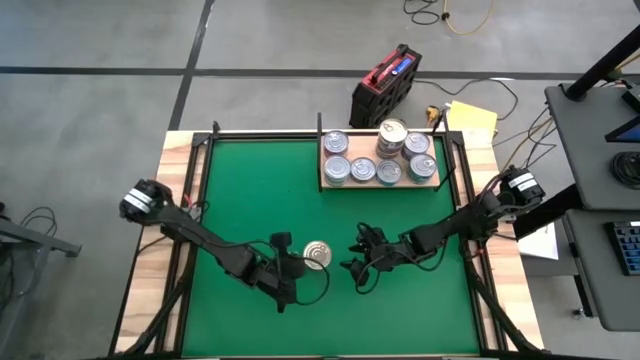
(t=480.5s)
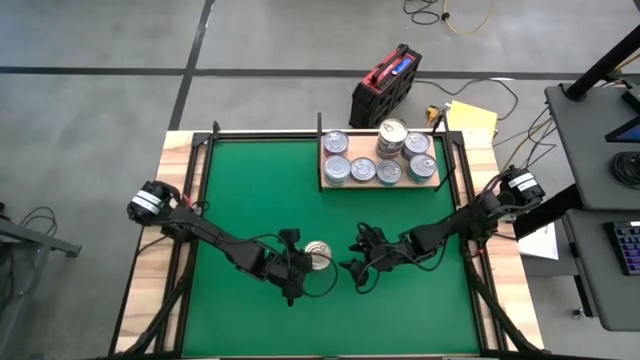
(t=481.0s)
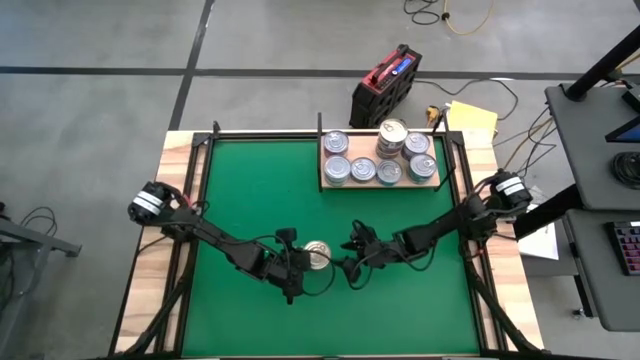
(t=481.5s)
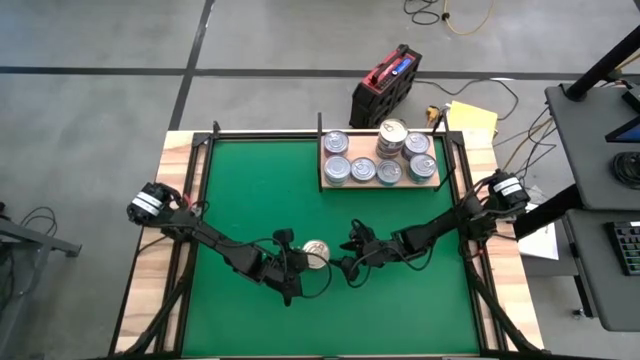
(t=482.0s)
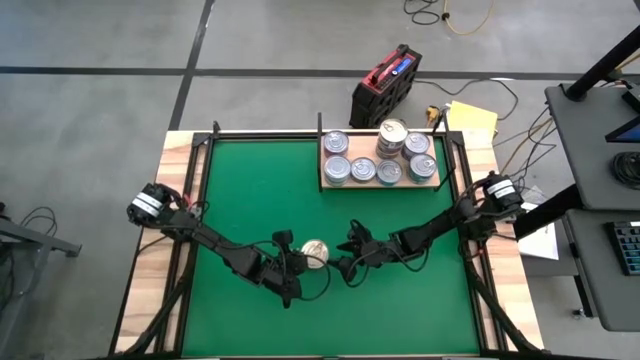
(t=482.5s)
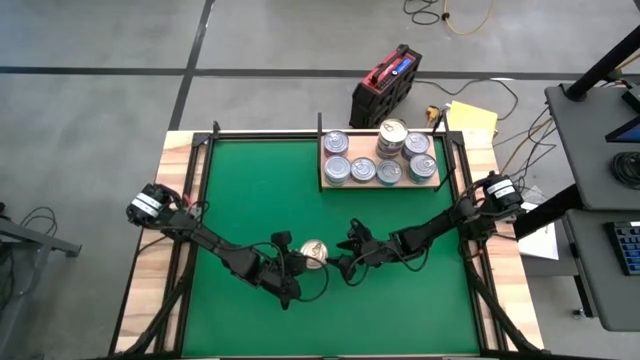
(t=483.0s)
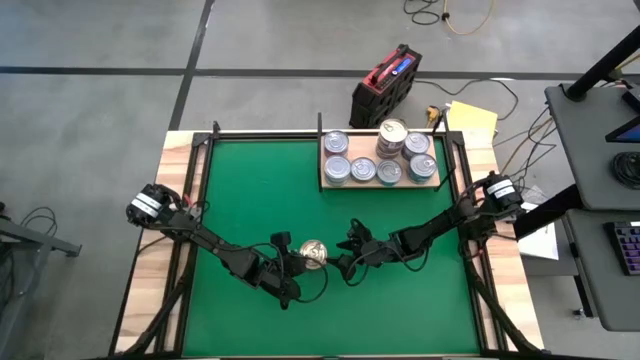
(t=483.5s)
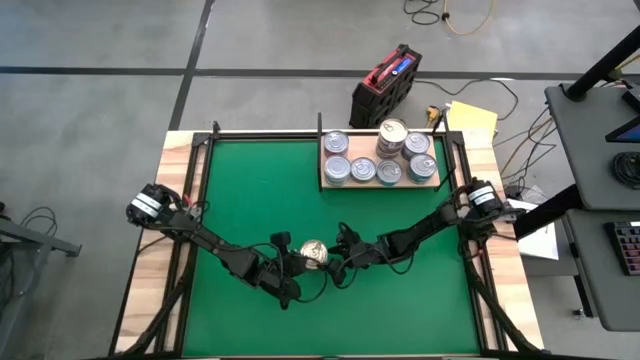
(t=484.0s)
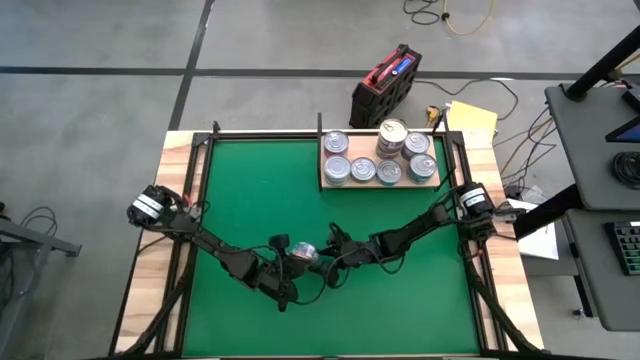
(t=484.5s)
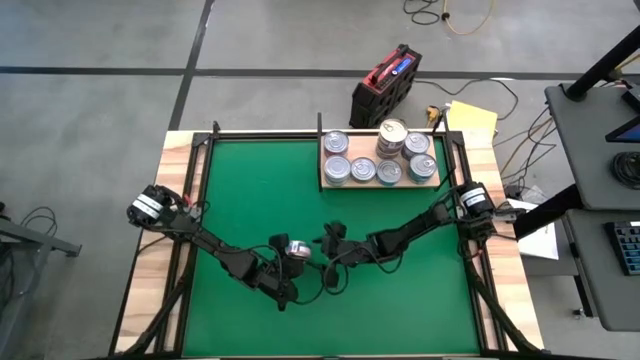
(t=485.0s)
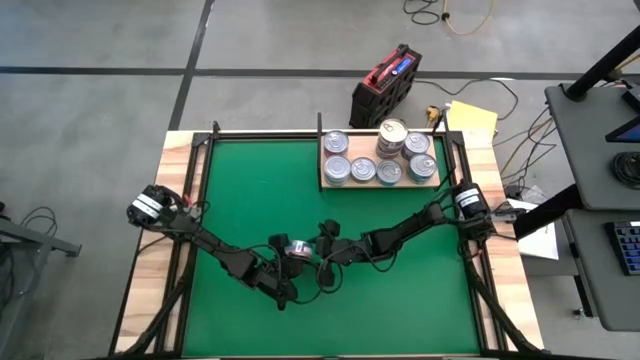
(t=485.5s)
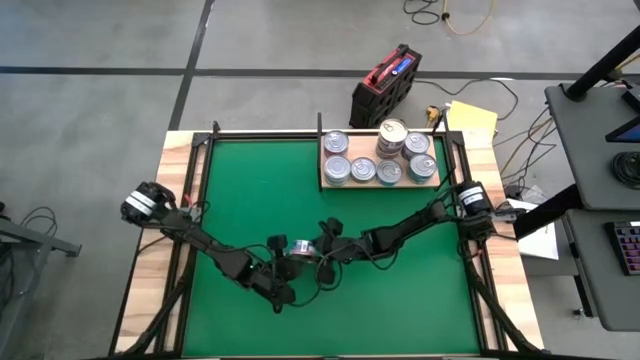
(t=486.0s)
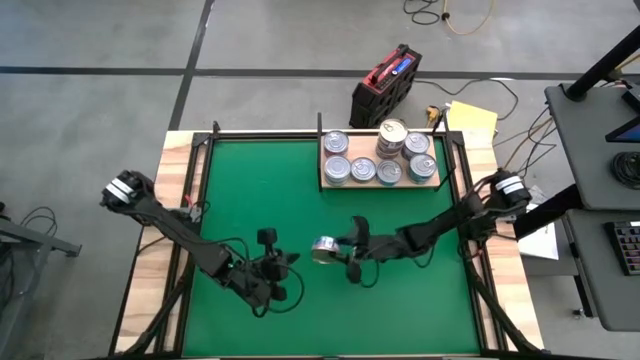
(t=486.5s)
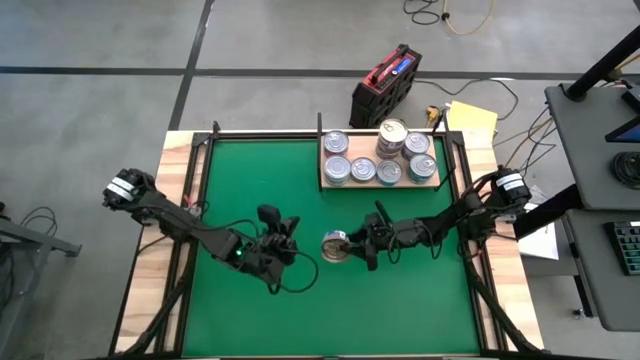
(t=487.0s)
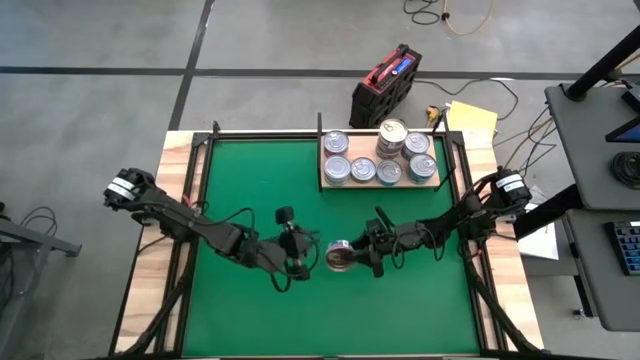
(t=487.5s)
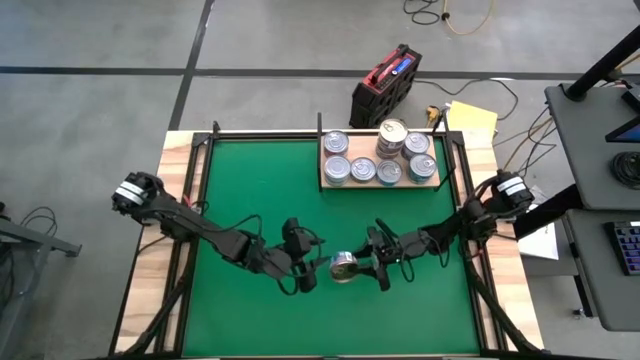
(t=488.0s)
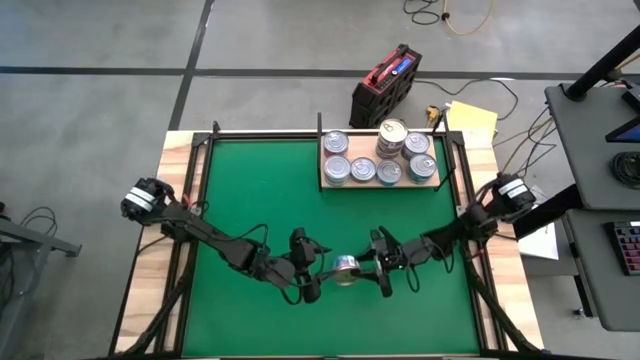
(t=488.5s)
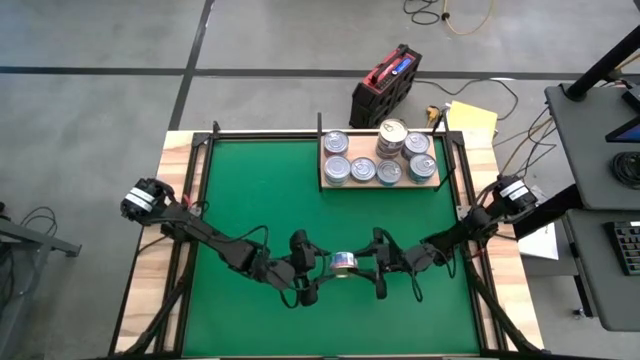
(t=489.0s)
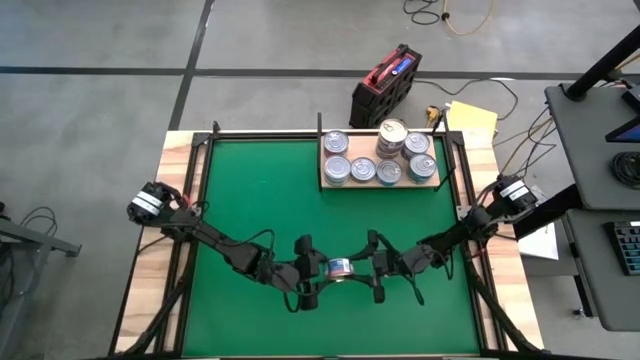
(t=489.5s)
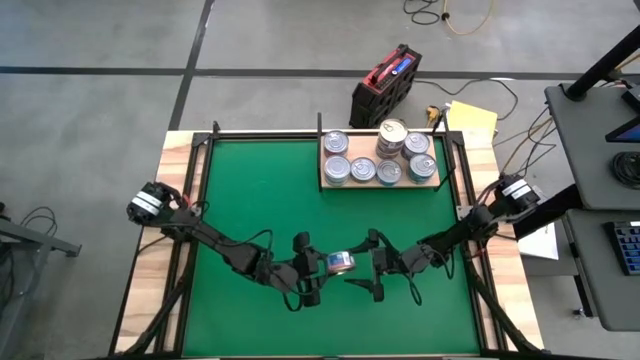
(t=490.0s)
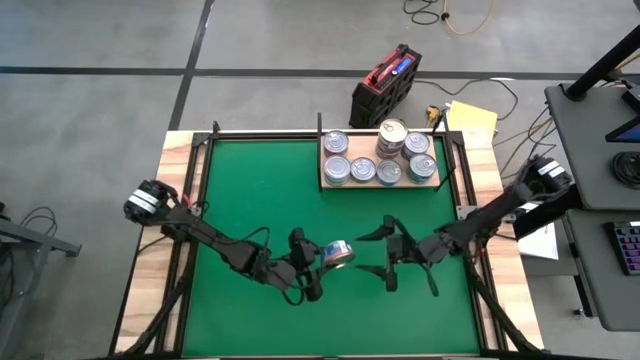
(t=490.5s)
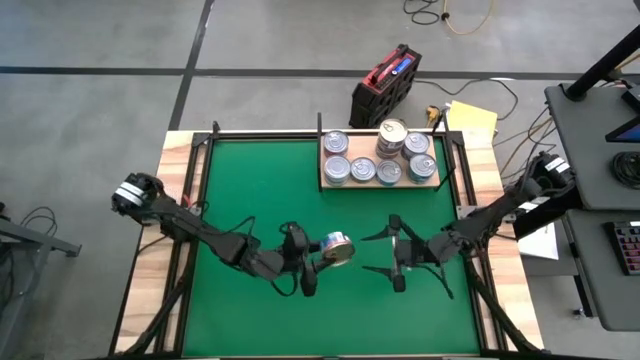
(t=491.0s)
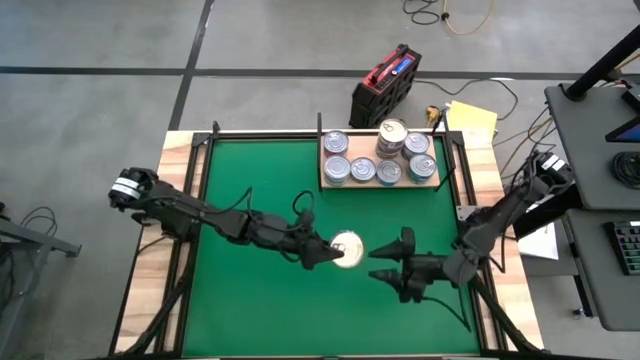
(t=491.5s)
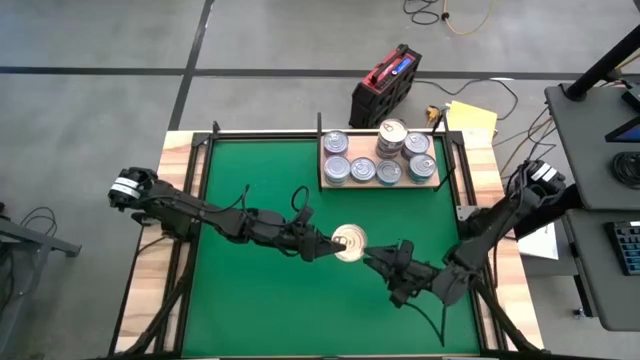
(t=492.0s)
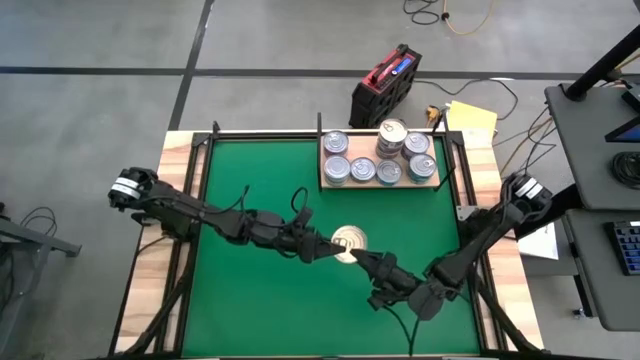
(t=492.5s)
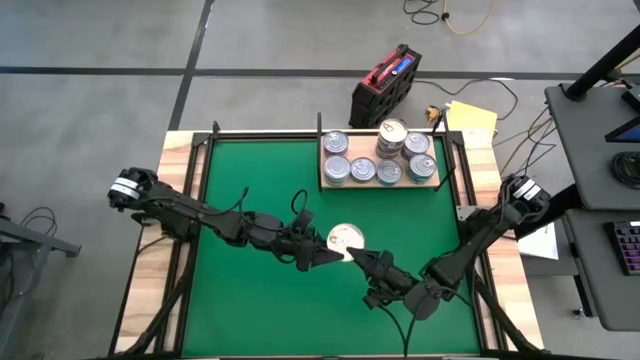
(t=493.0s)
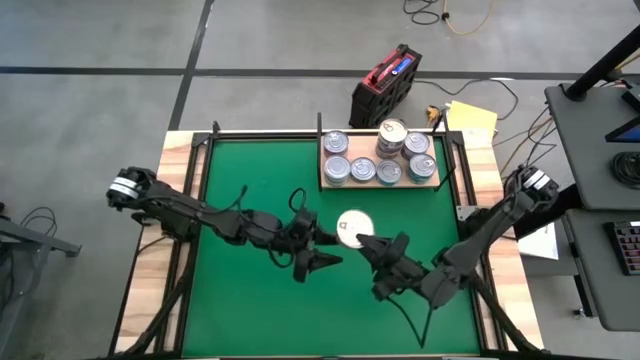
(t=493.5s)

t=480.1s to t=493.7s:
Task: Stack canned seafood by type on shelf
Stack the blue/pink tuna can on top of the blue/pink tuna can on the shelf

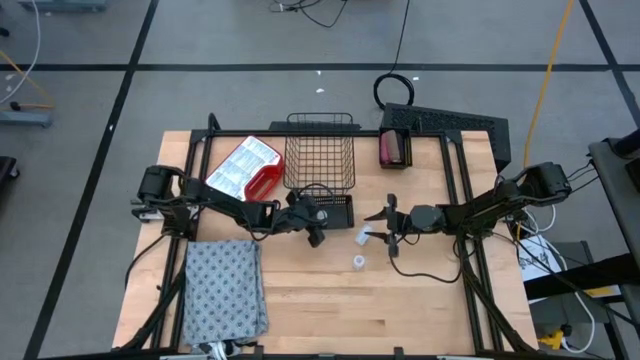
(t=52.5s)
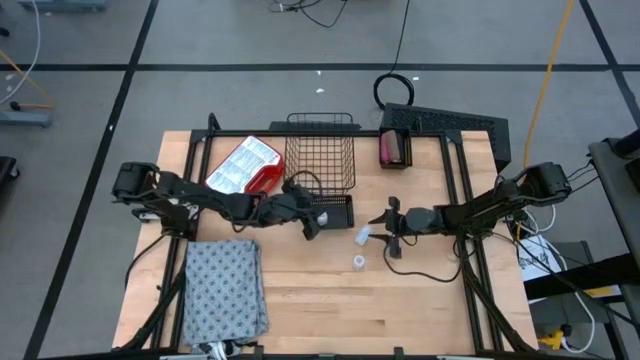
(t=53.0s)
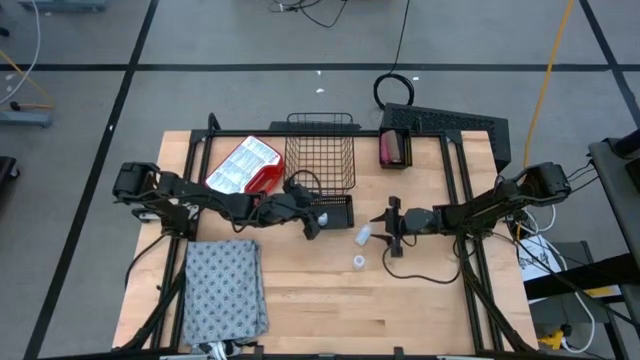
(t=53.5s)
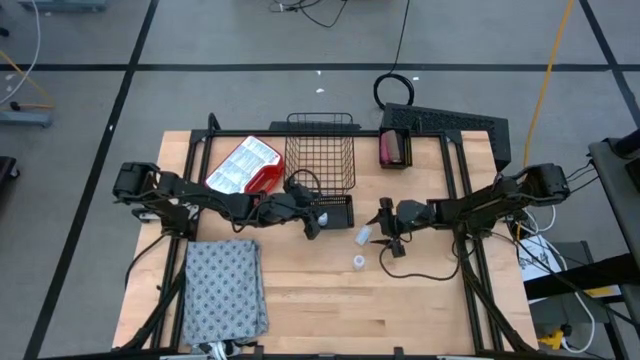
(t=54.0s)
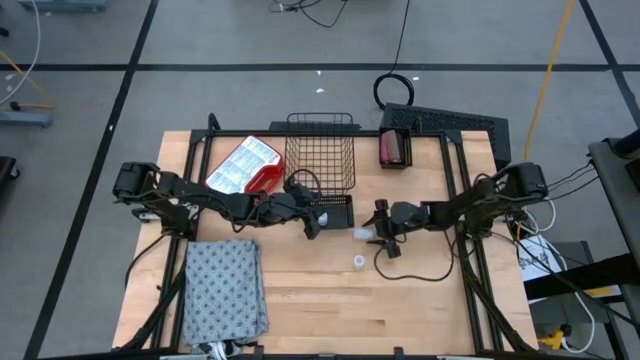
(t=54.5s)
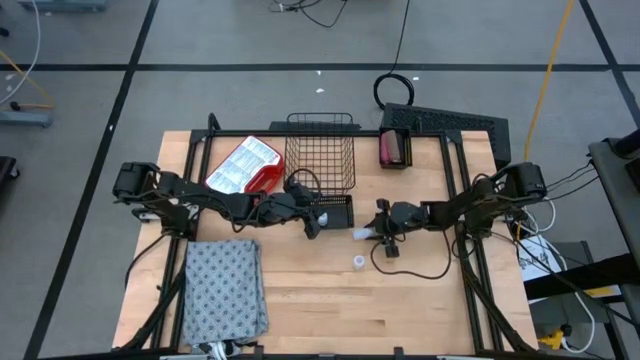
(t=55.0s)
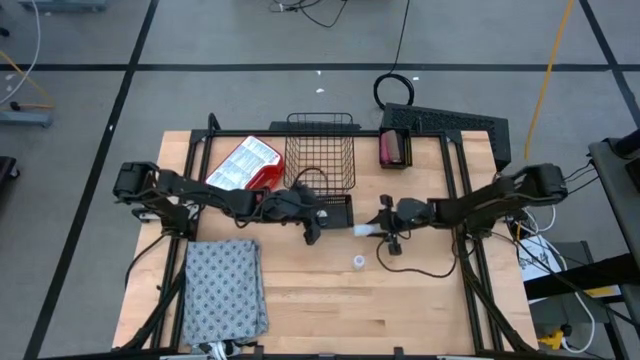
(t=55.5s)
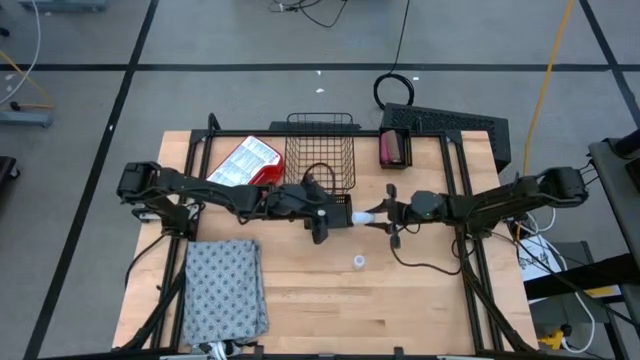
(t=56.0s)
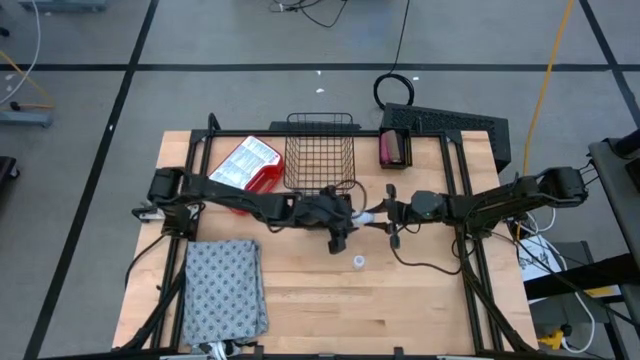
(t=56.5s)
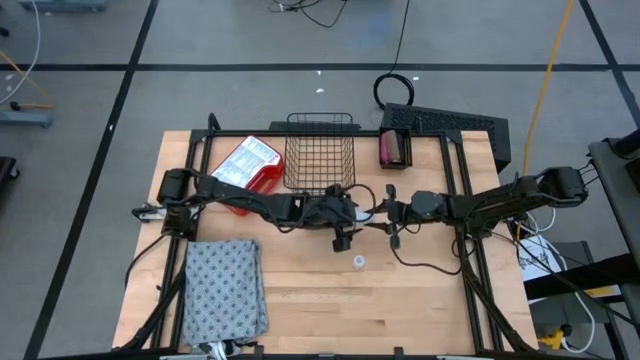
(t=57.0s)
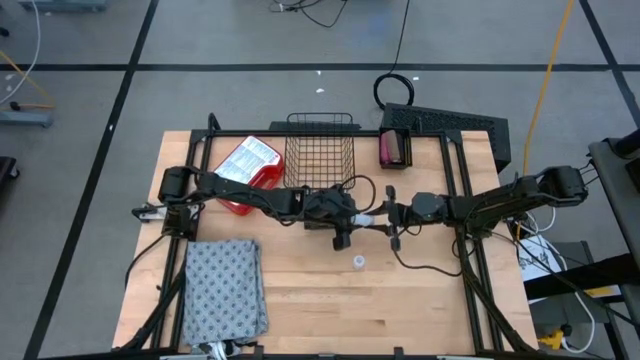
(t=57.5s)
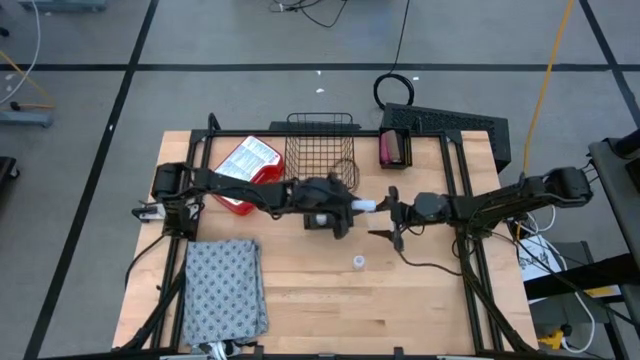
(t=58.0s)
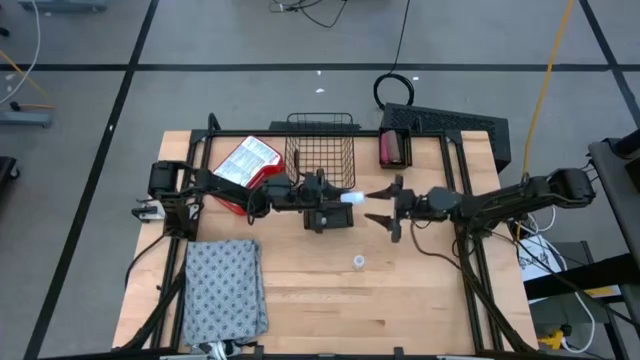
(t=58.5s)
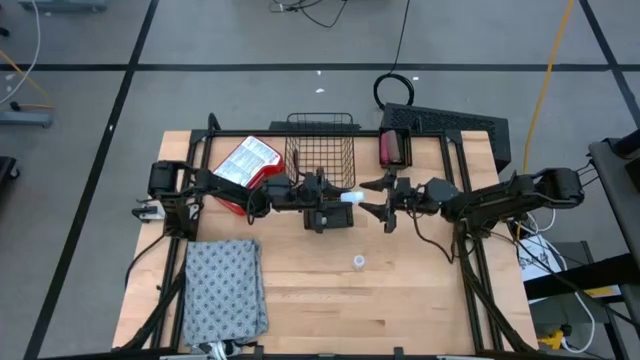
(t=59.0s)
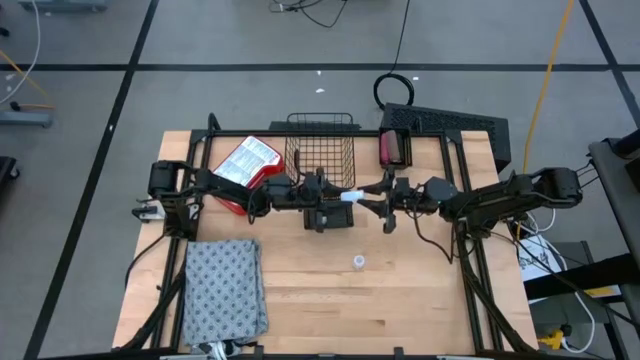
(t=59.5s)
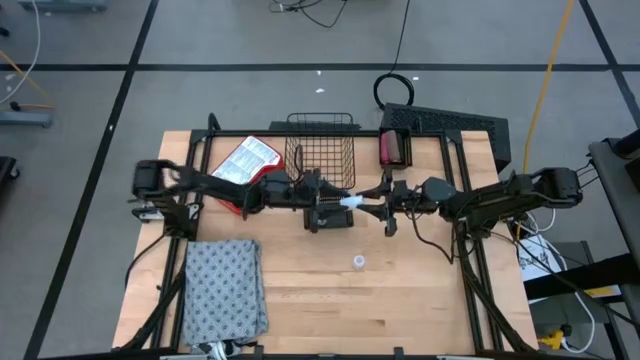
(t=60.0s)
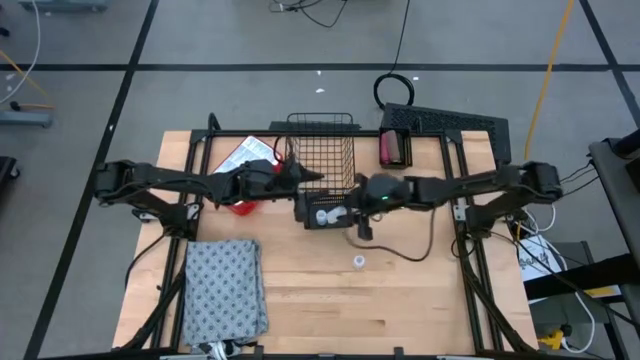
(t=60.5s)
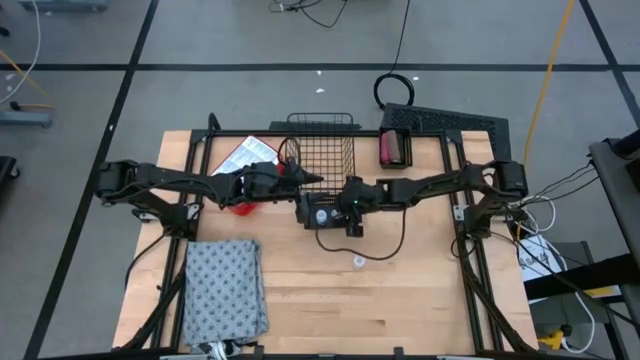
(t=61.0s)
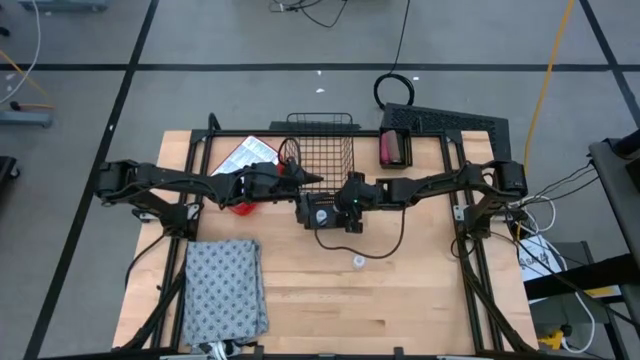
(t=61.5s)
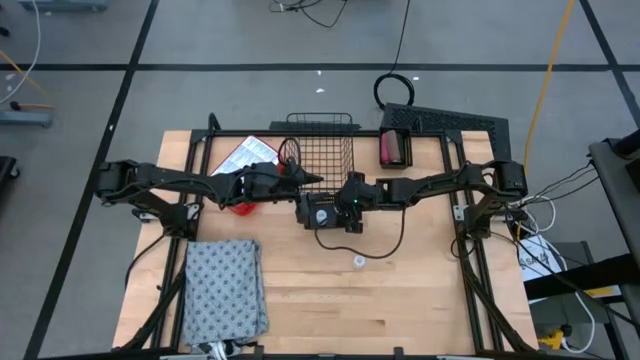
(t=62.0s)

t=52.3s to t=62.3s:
Task: Pick & place medical supplies in basket/bin
Put the top white pill bottle into the bottom black bin
